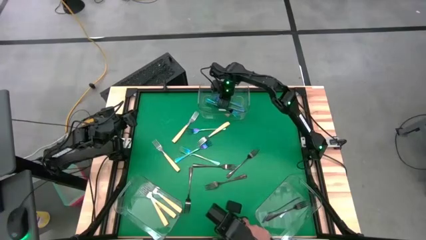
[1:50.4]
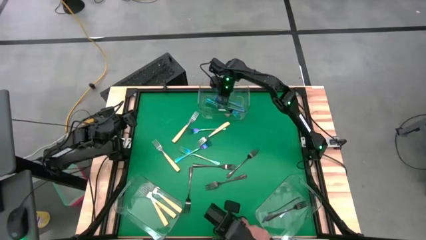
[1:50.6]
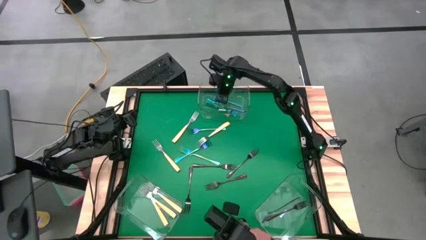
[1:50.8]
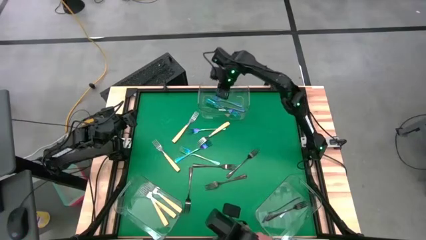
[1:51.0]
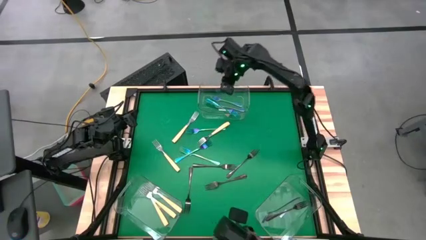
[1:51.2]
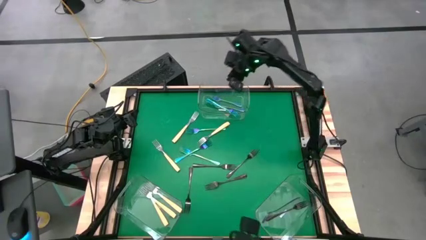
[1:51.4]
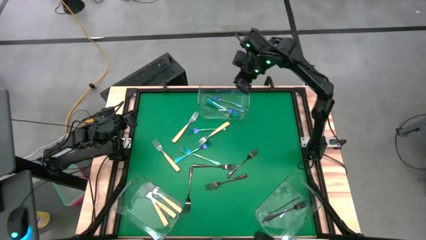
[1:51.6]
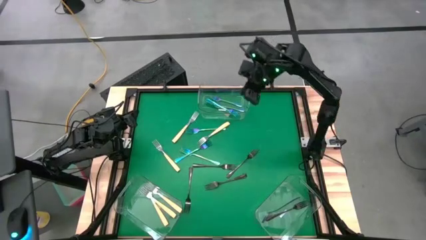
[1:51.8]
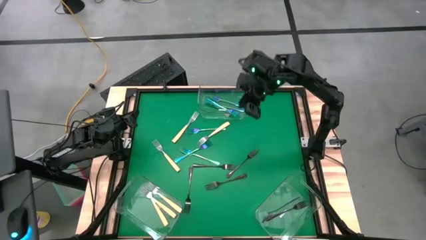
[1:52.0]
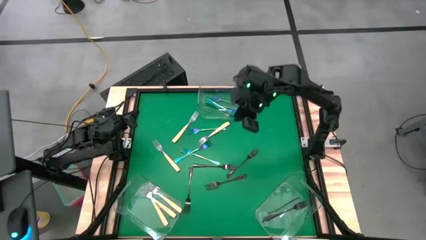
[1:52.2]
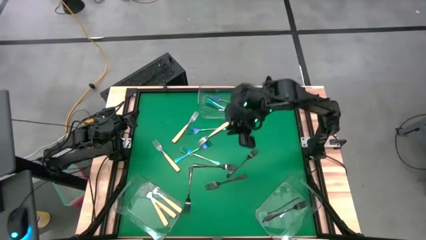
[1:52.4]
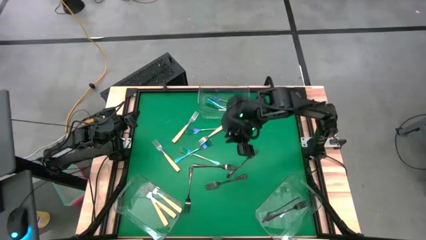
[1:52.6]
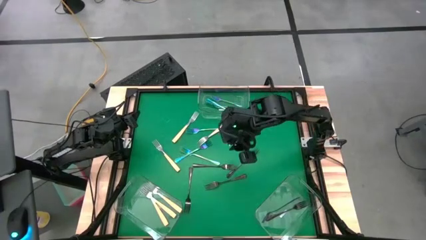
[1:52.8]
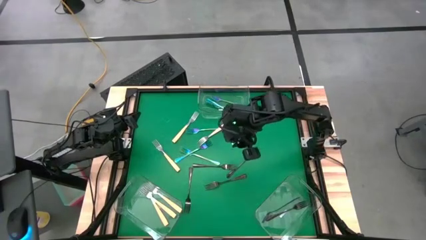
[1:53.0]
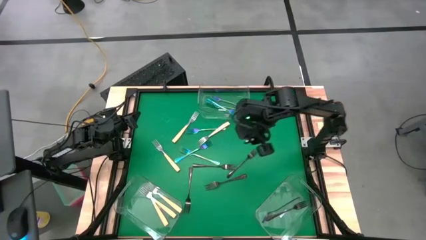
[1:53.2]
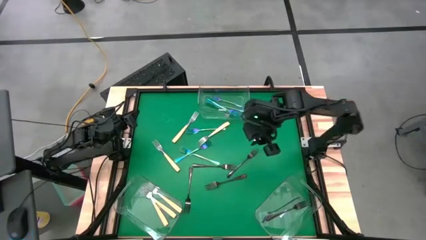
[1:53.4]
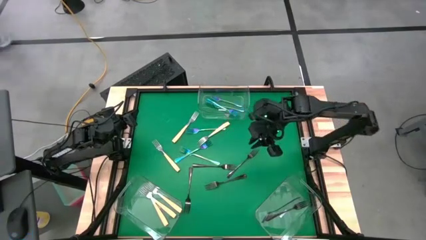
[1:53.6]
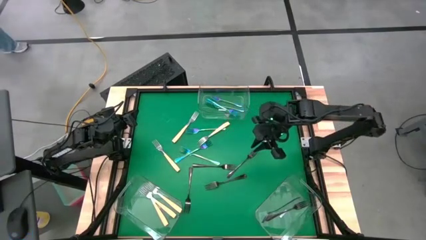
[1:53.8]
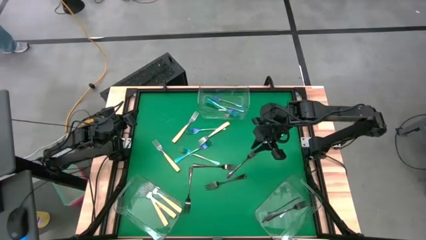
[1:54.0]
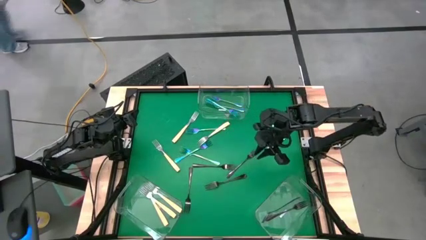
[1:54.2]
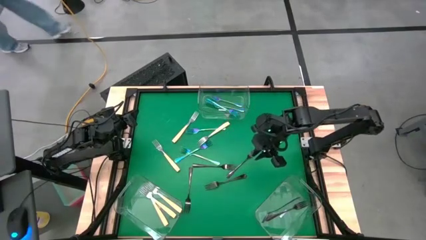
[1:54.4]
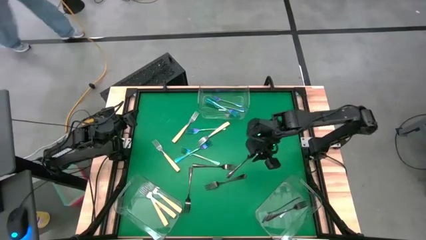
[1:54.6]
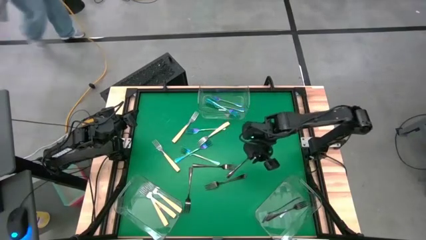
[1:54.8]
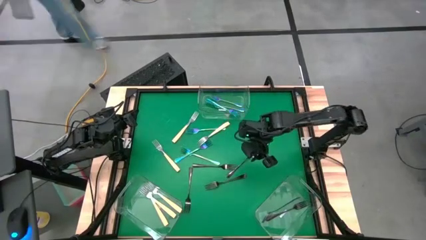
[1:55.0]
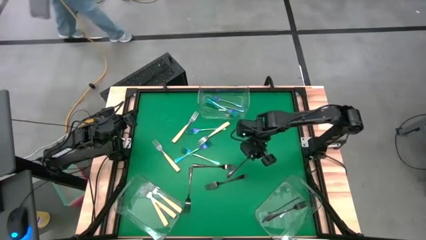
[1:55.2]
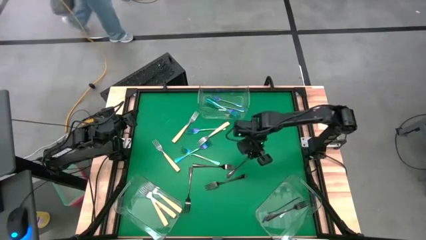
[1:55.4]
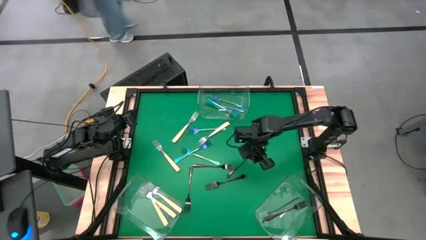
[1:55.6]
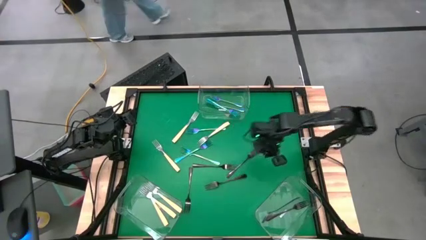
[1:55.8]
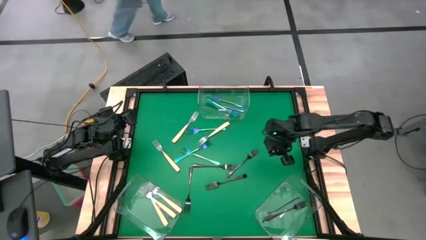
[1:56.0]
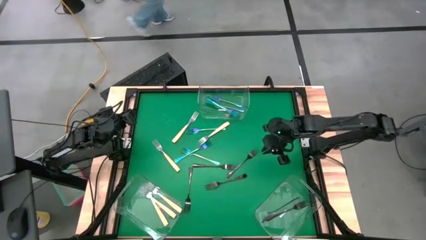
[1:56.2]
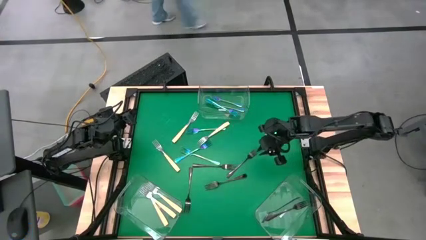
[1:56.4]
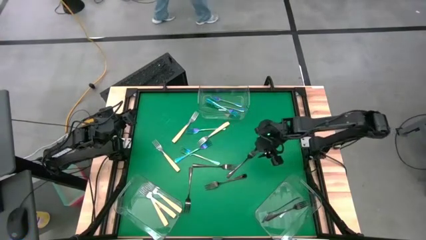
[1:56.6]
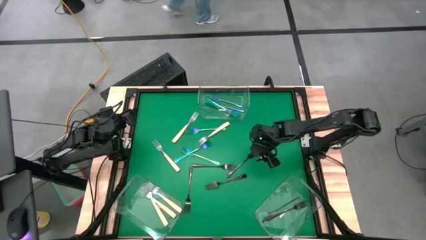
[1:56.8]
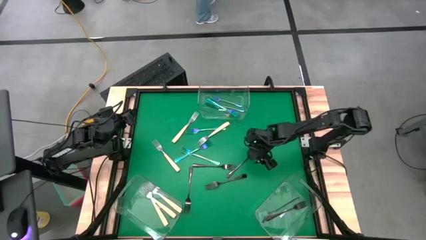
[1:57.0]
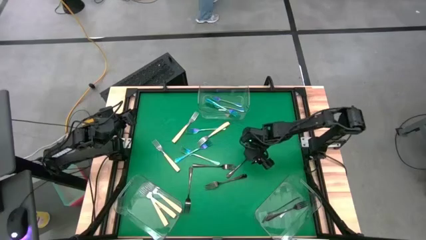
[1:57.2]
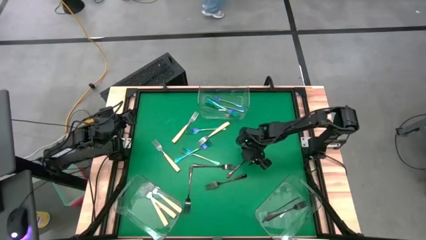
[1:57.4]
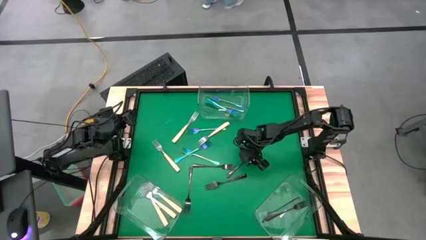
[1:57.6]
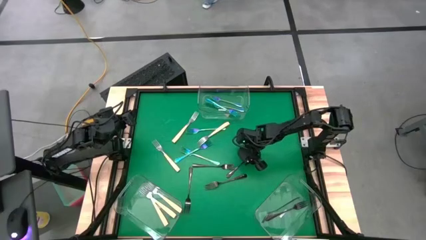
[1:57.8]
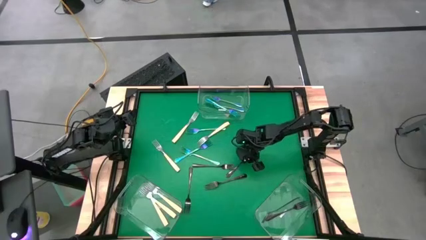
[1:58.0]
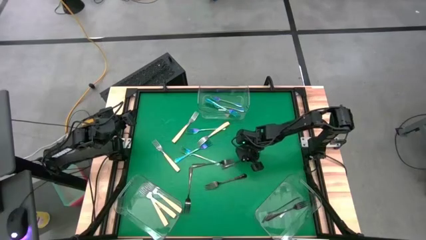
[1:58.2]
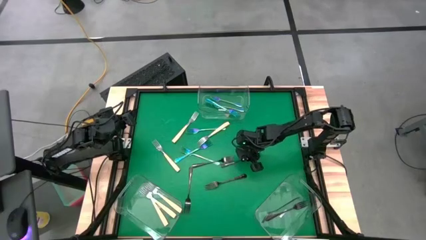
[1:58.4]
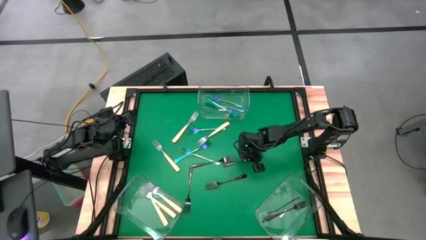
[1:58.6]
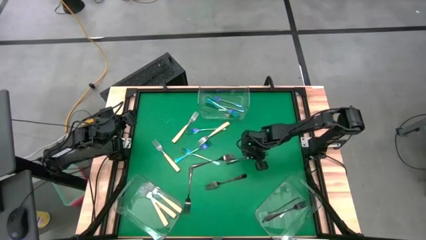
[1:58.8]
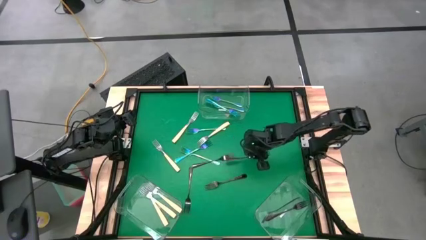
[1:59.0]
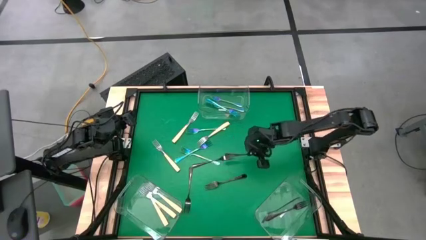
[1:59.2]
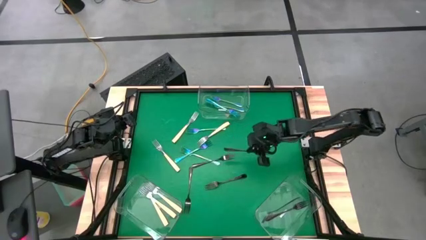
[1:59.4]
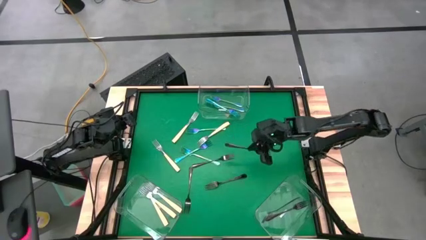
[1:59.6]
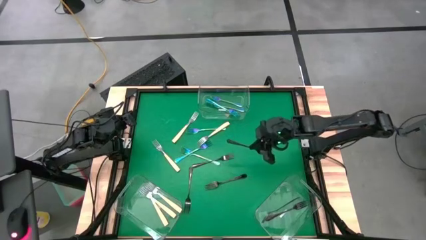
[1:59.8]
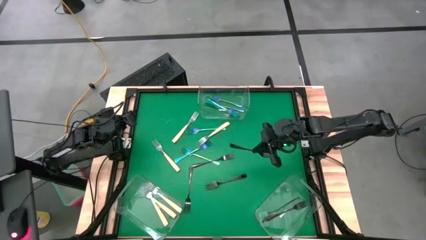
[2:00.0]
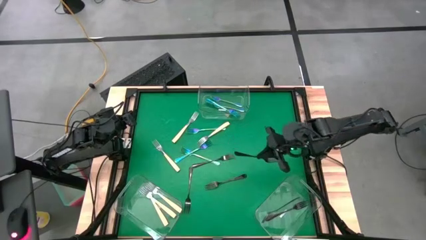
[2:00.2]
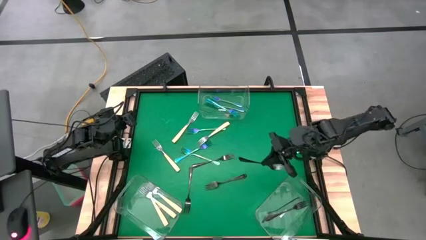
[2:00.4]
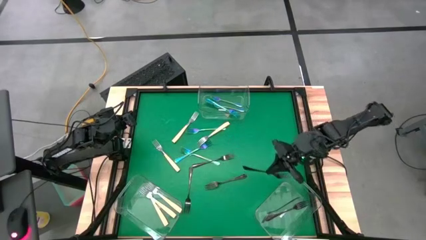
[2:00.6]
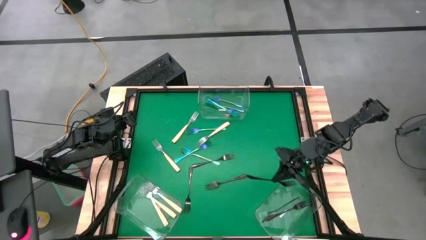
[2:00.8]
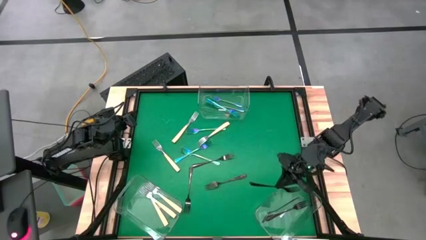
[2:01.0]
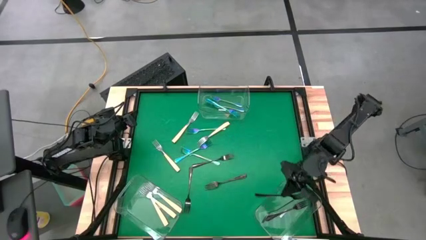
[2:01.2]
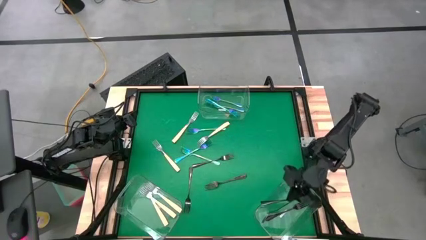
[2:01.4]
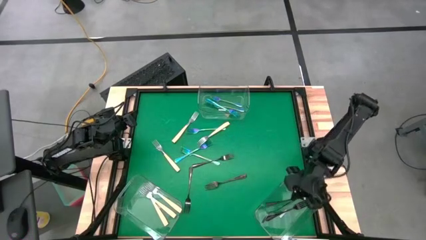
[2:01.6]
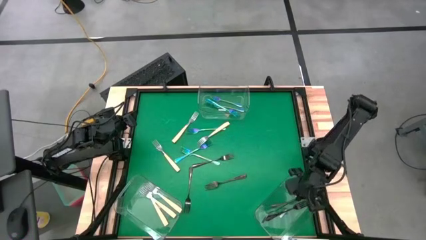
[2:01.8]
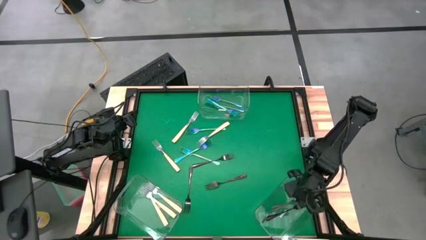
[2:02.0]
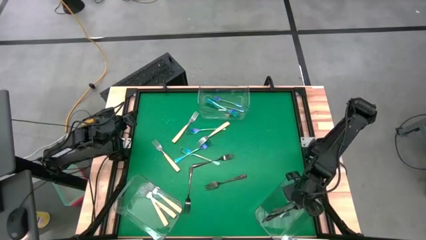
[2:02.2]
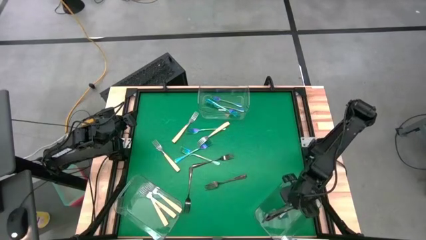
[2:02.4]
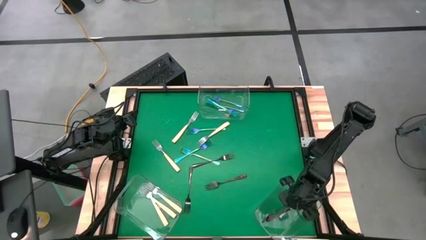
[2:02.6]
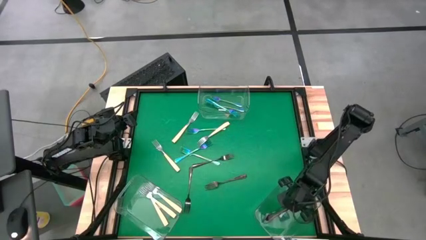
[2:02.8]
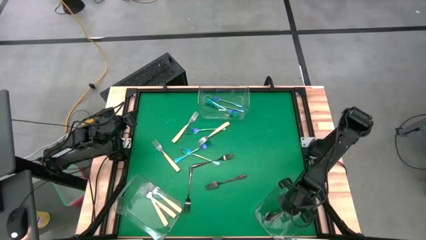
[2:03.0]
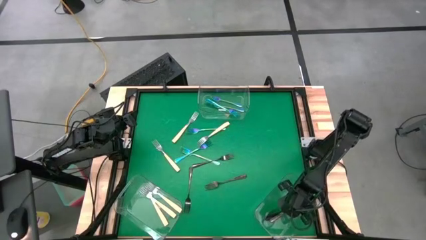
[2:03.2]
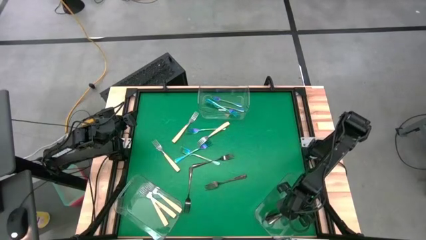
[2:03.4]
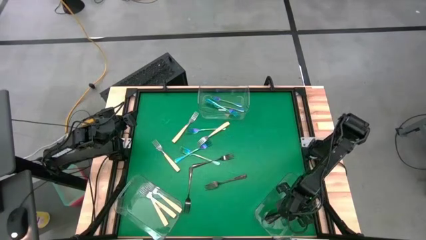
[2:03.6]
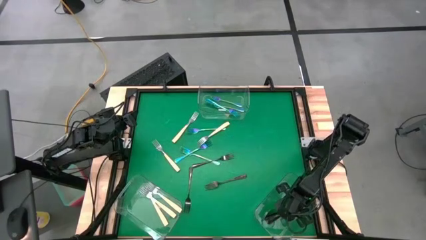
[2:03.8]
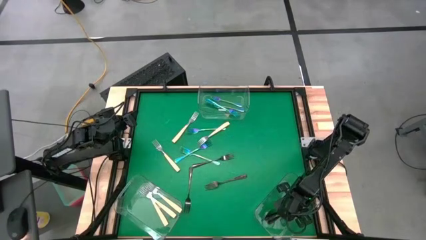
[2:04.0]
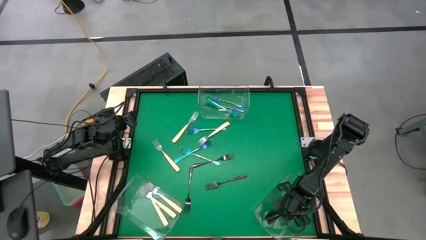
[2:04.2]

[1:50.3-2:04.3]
Task: Sort silverware by color (type)
Put the black fork into the bottom right transparent bin

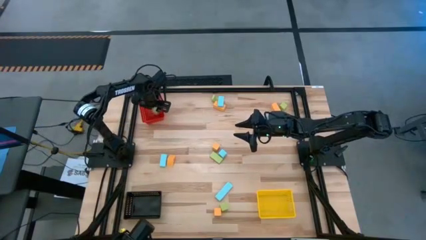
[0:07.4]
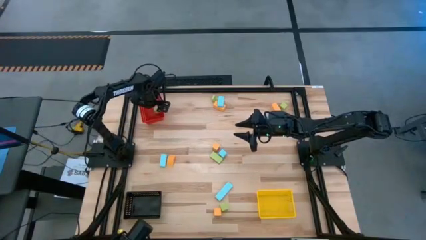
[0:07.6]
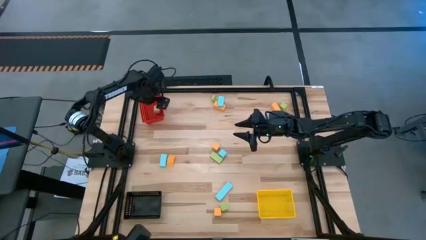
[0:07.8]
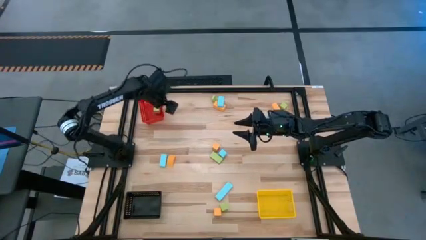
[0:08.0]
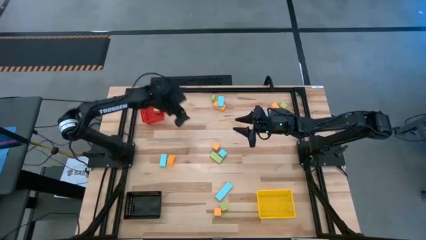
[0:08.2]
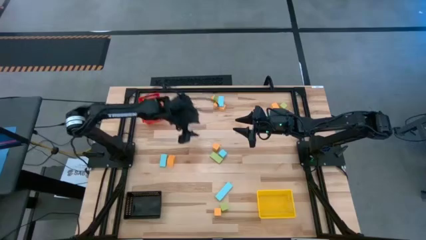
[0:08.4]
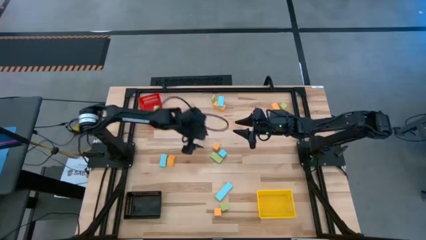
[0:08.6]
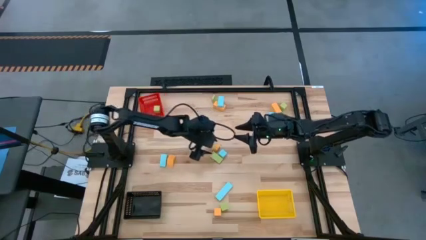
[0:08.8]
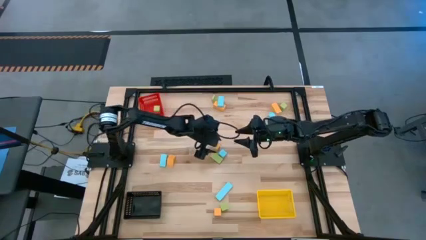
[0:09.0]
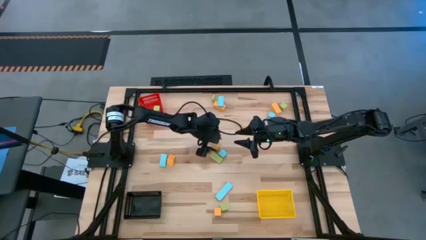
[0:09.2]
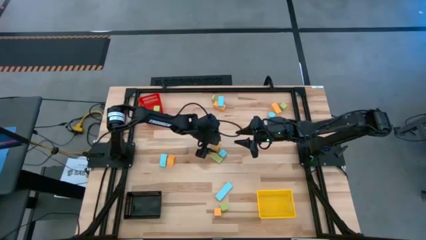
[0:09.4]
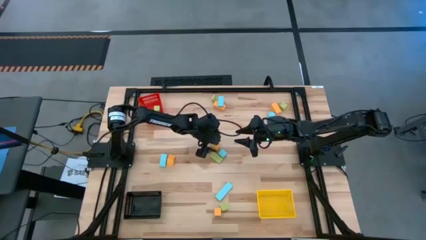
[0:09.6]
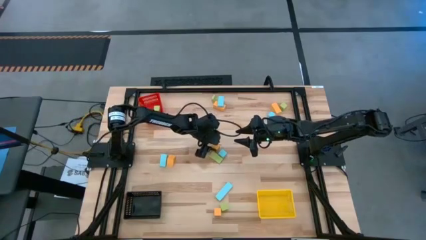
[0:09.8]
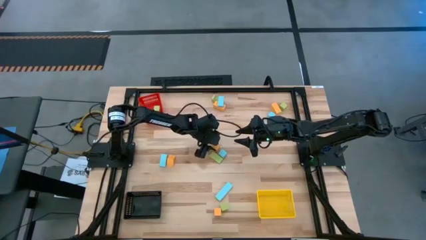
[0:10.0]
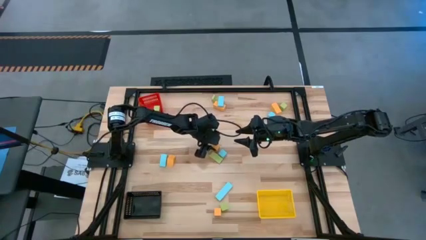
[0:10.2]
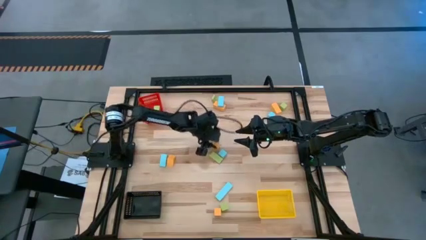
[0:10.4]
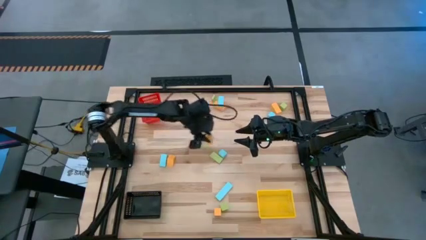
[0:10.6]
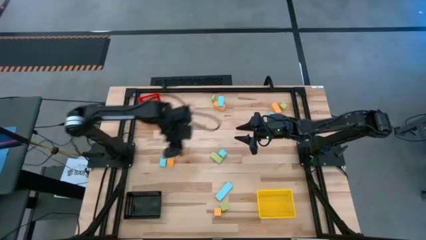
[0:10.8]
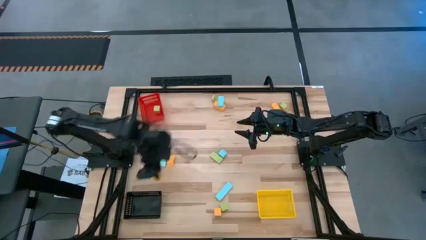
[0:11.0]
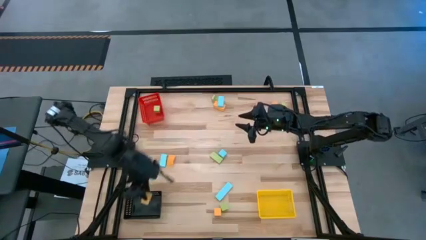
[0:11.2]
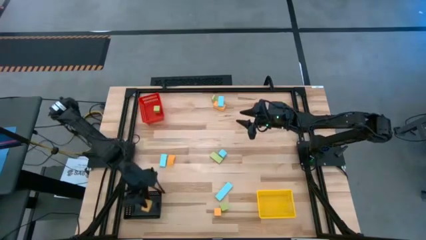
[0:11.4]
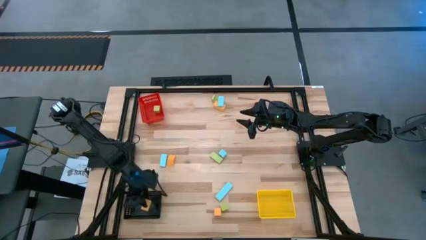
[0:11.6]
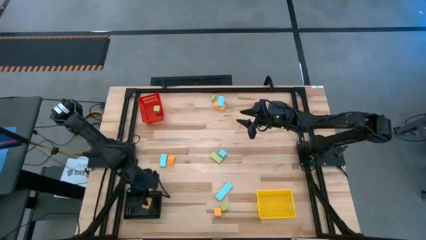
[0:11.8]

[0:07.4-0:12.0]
Task: Sort & place blocks by color
Put the yellow block into the black bin
